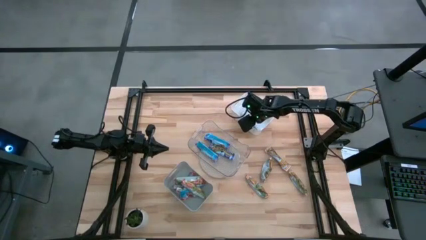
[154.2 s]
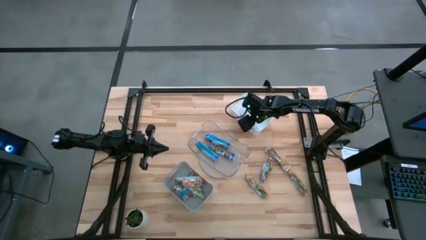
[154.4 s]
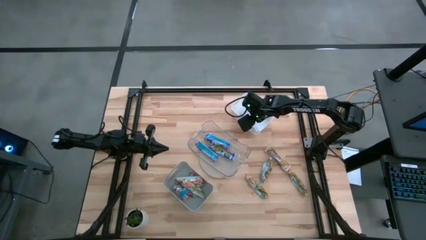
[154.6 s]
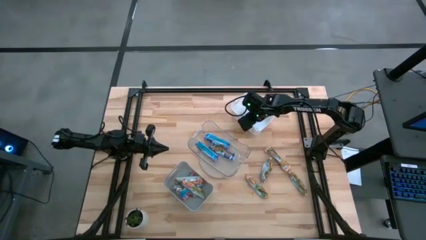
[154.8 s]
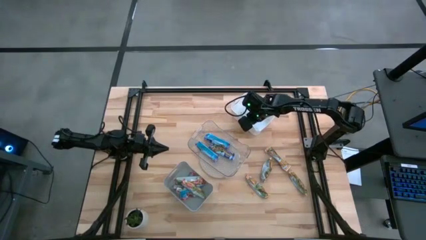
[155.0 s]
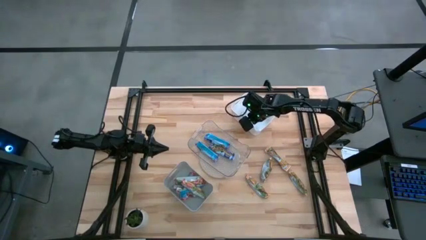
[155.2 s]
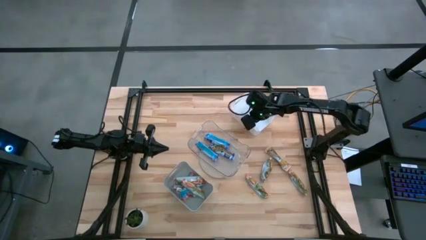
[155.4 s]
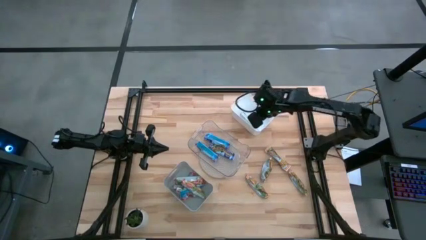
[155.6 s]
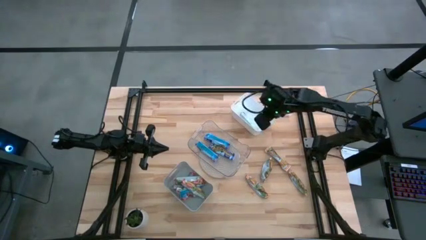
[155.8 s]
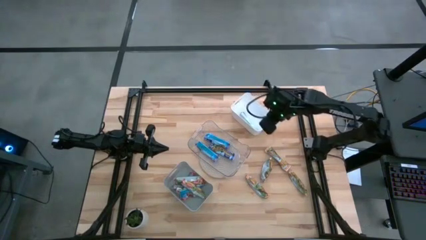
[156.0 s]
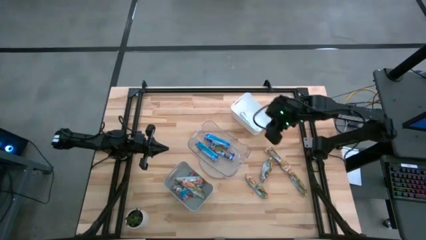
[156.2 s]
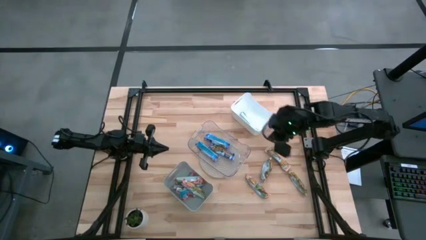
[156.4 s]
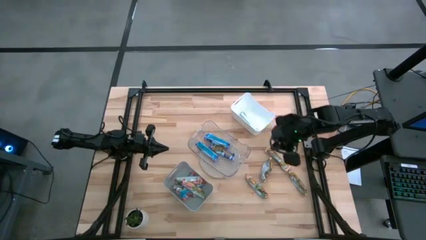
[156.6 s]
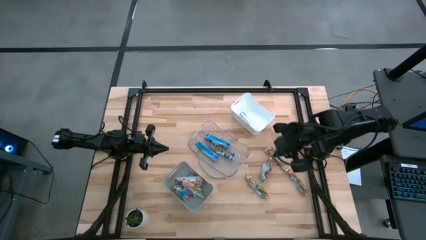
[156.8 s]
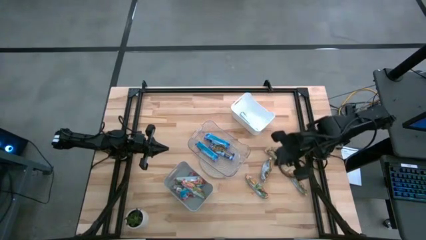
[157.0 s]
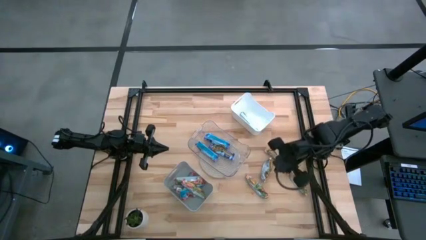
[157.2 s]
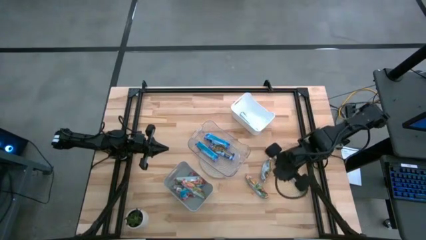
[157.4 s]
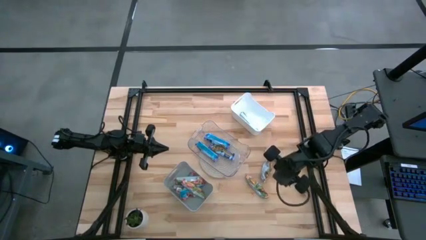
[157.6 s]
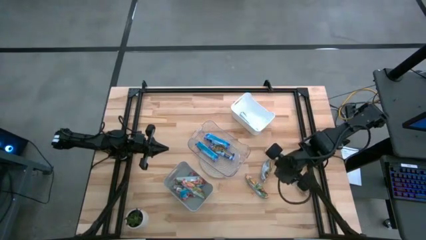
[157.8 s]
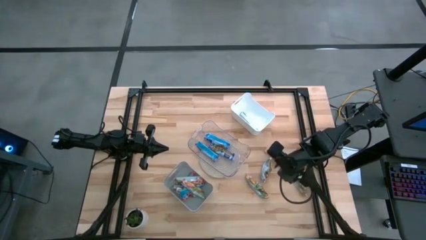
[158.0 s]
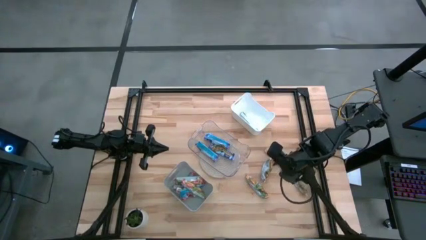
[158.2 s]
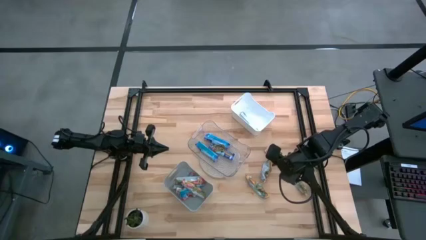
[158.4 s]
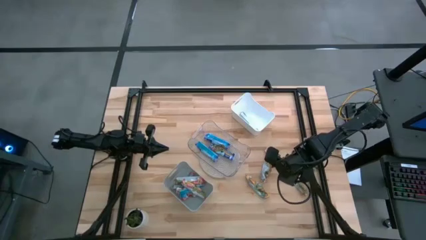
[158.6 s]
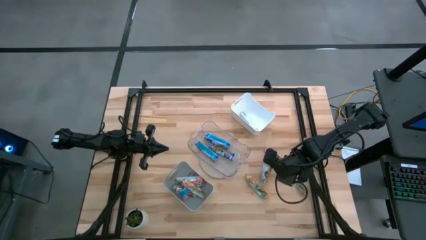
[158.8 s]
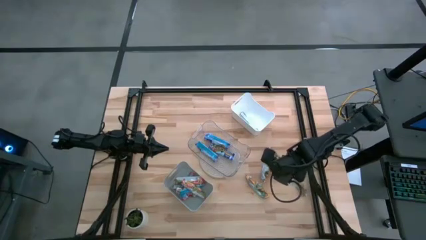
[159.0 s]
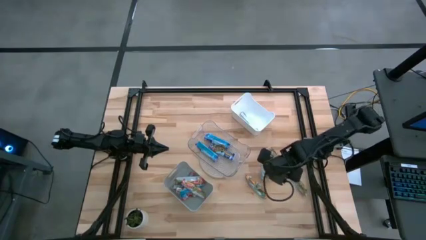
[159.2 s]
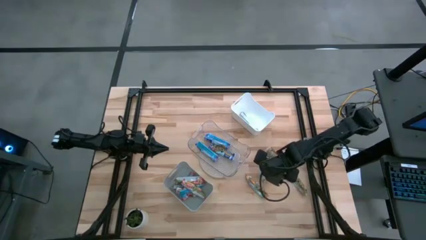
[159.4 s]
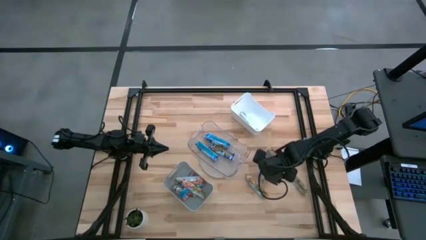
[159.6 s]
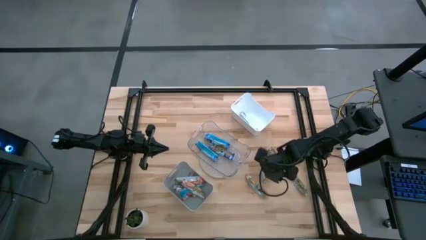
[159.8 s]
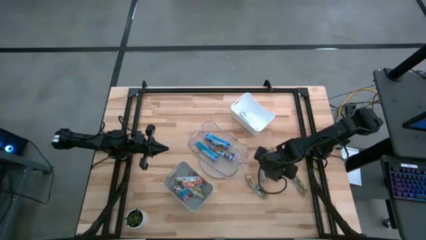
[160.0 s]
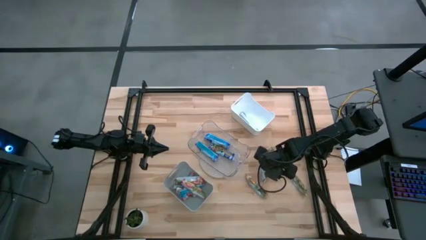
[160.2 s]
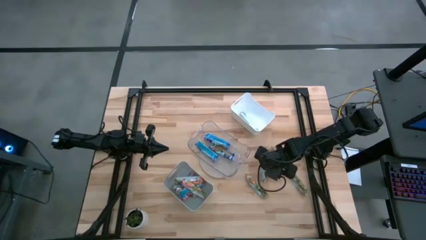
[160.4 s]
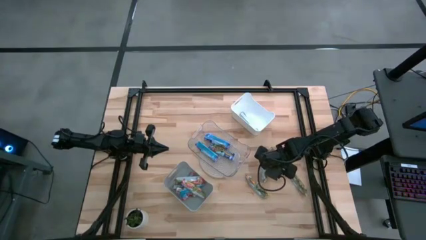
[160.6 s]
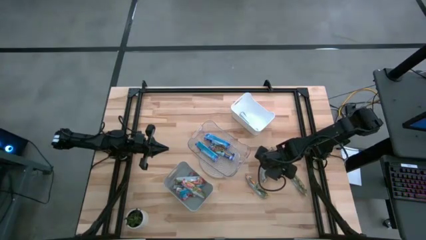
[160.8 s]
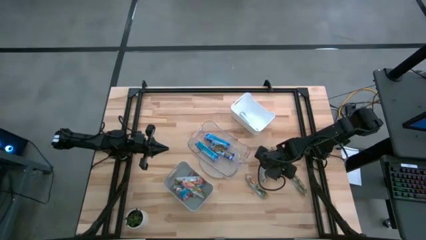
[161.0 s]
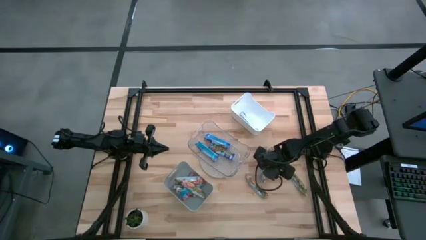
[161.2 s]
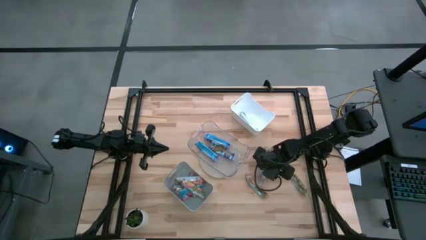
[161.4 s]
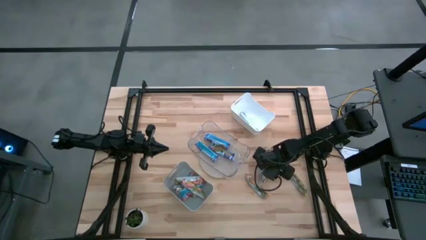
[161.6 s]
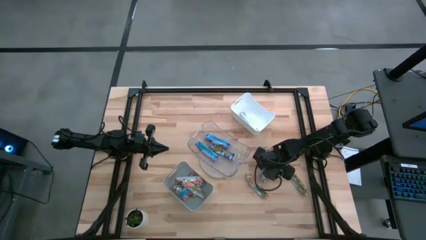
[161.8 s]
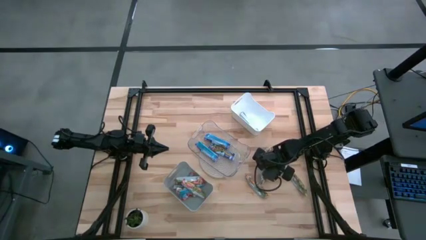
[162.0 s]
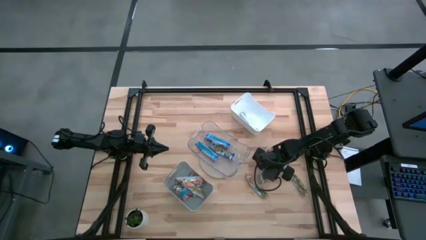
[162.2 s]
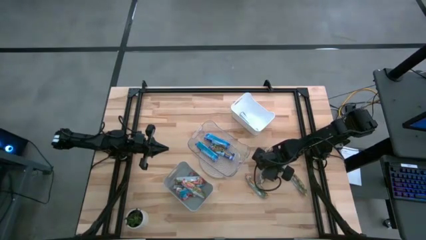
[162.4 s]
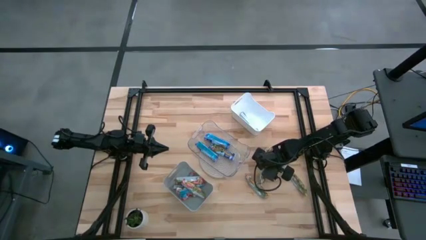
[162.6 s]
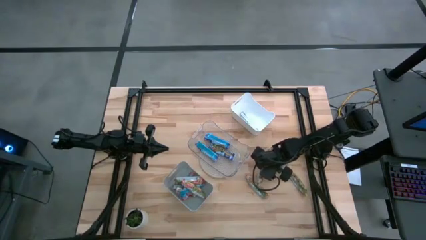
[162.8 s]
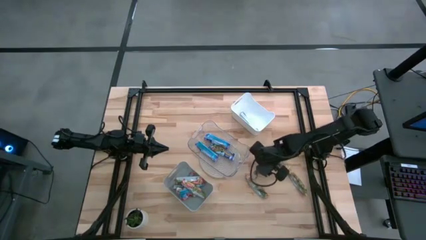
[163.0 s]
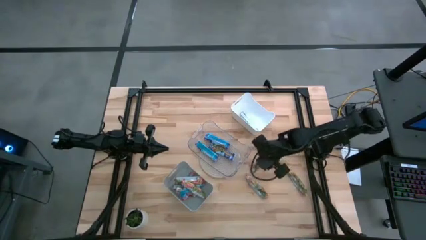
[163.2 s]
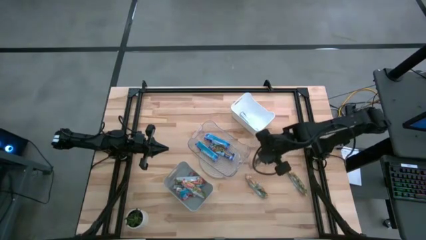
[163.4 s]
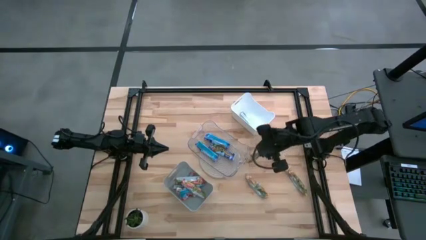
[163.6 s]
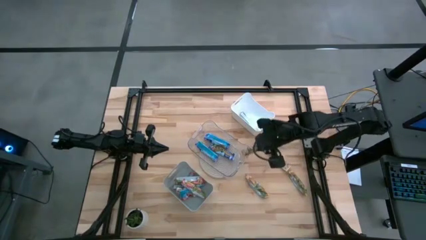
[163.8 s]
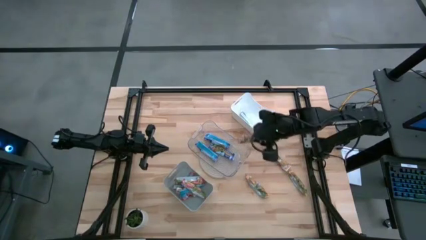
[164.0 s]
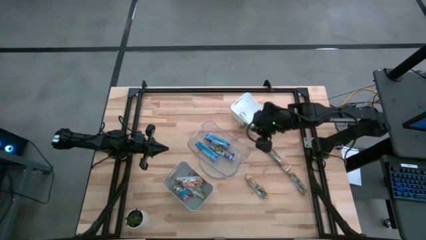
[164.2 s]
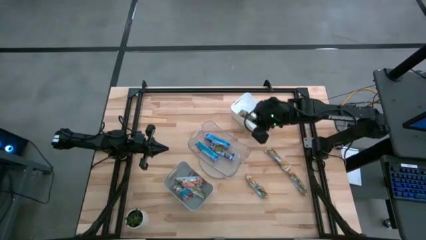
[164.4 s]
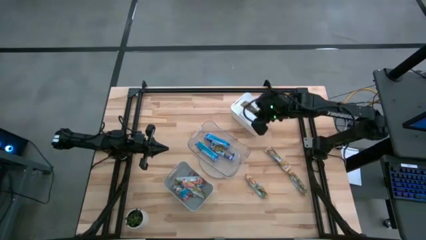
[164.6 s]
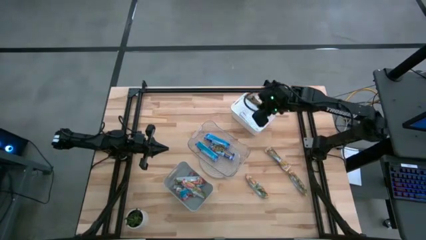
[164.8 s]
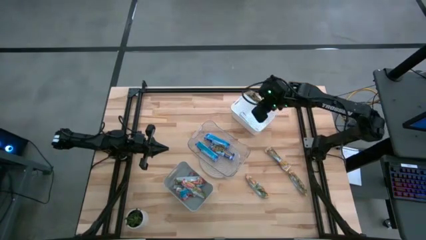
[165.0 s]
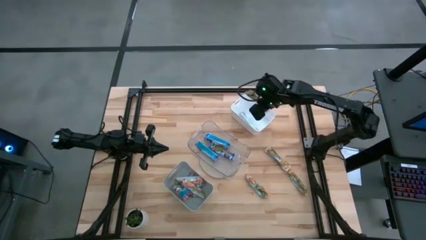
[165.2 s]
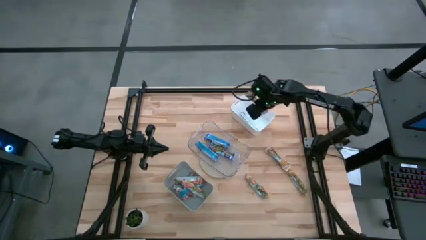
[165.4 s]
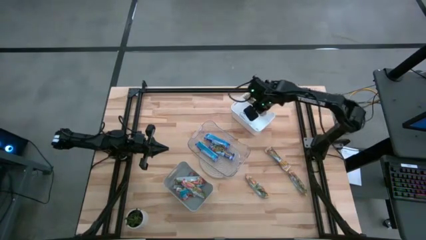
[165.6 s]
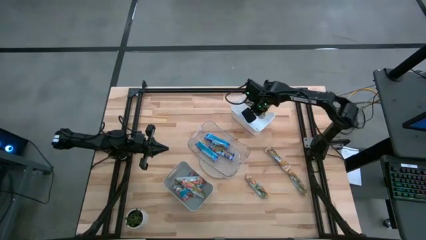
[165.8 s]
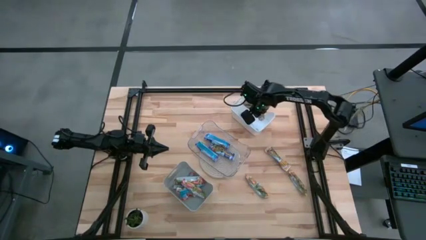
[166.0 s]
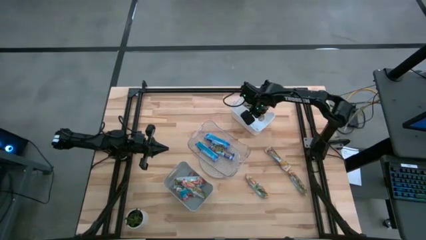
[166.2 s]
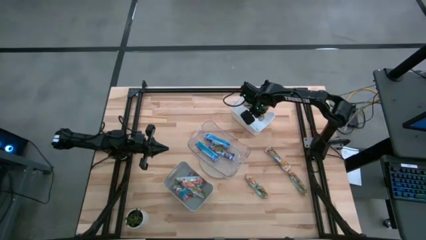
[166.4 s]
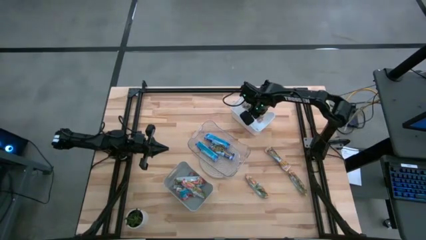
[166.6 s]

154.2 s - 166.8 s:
Task: Pick and place Granola Bars by type
Put the yellow granola bar into the white bin
